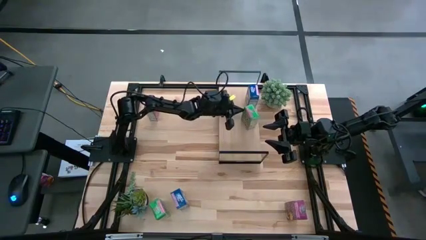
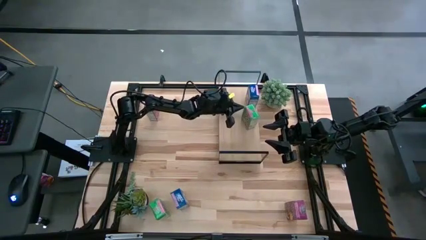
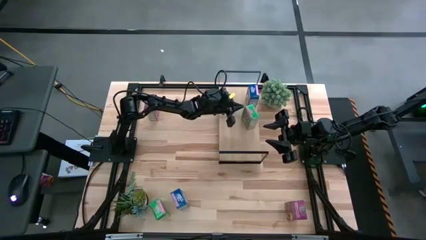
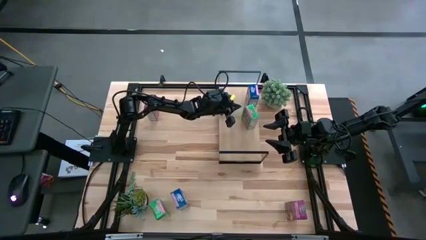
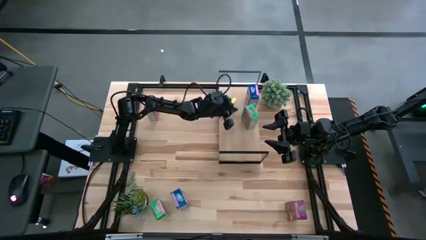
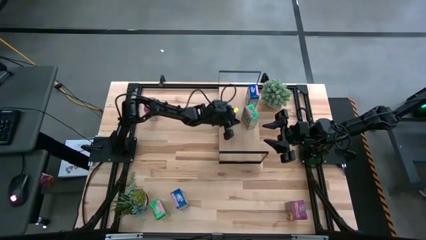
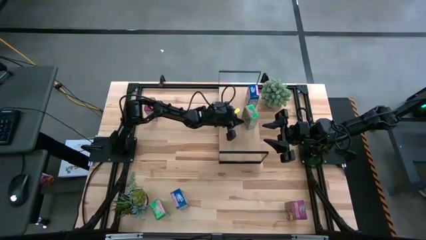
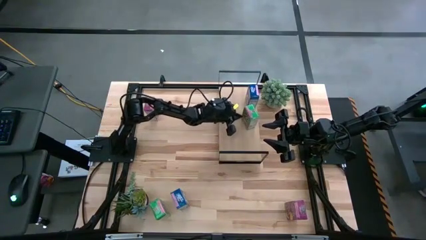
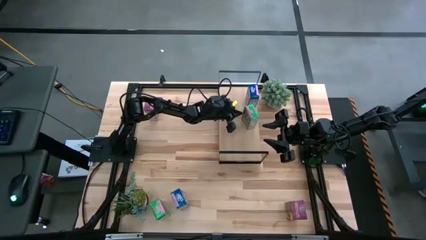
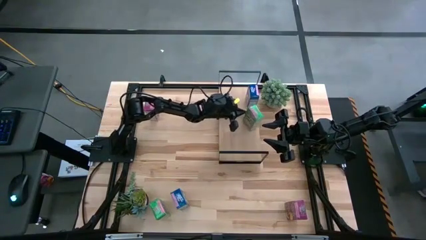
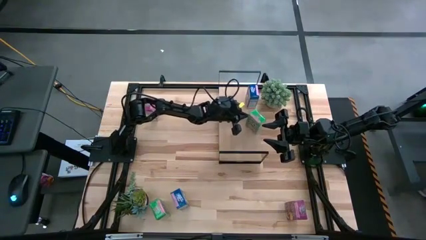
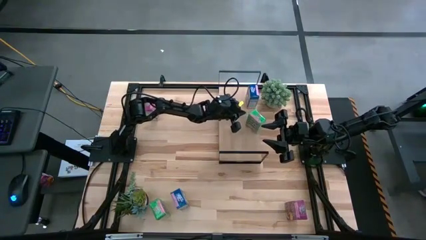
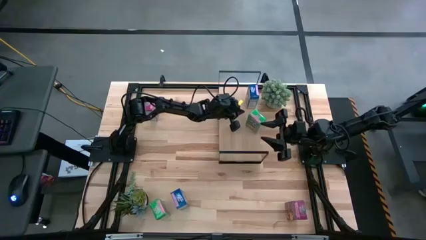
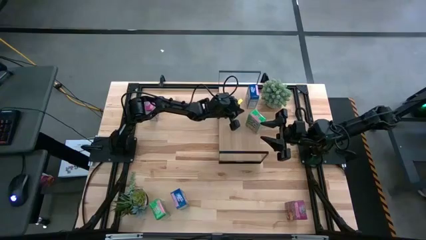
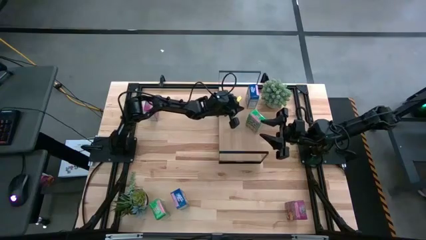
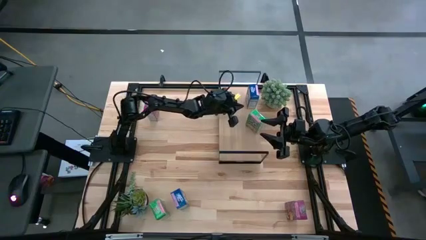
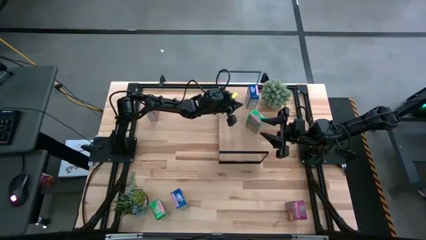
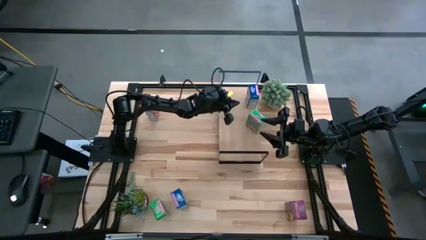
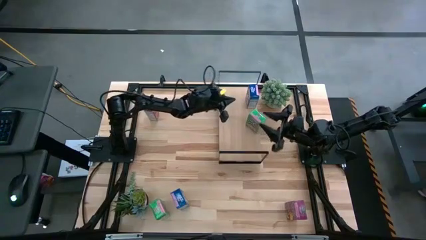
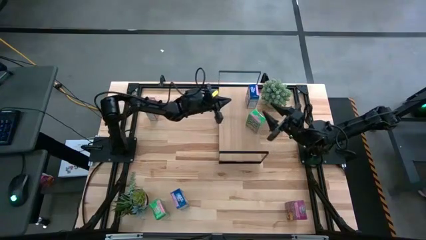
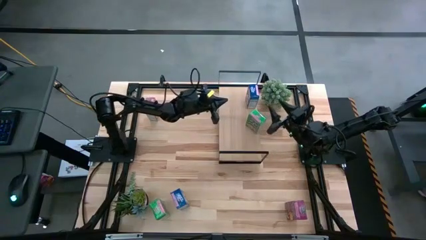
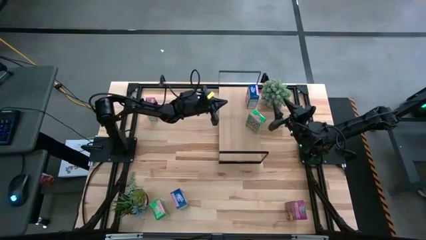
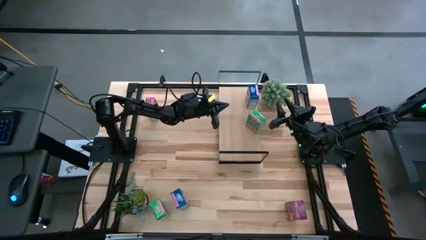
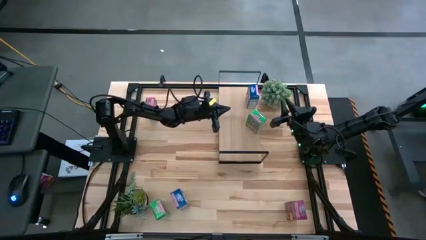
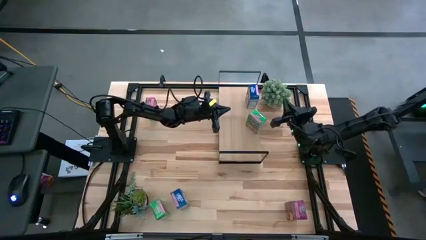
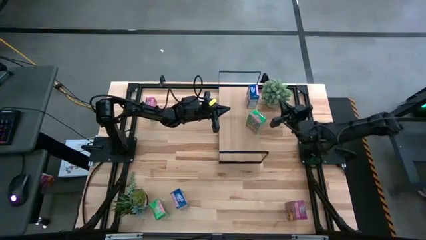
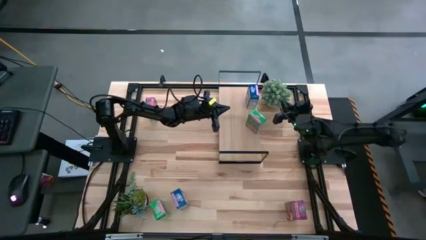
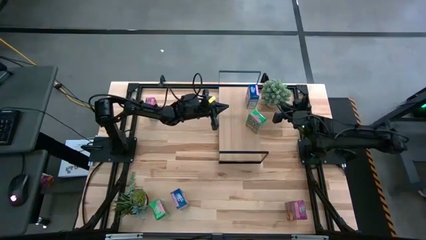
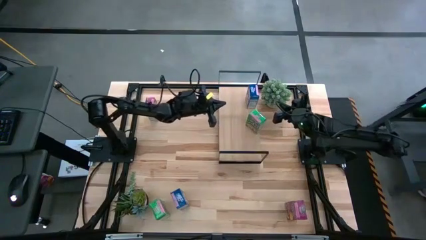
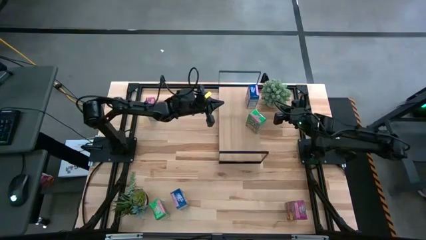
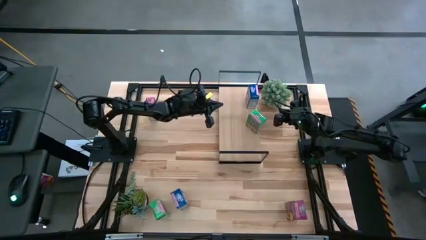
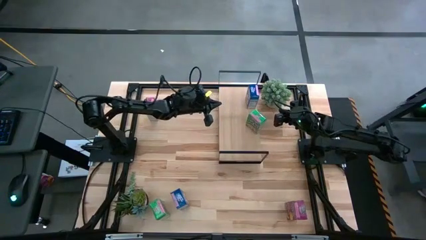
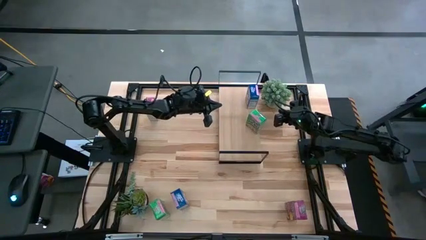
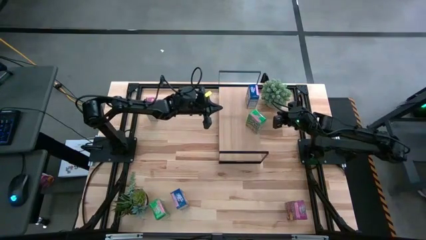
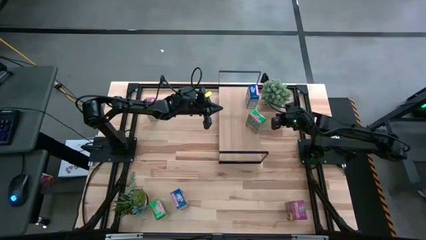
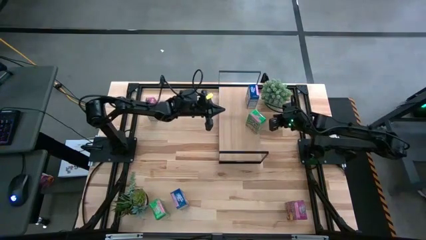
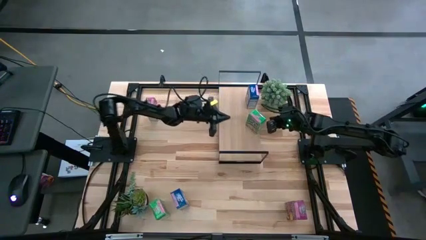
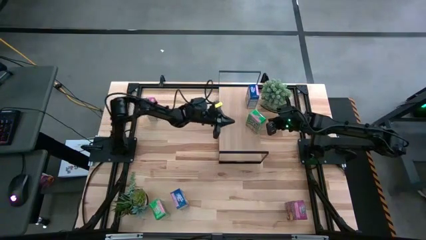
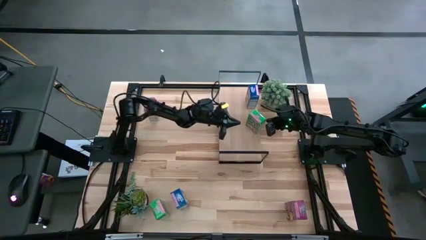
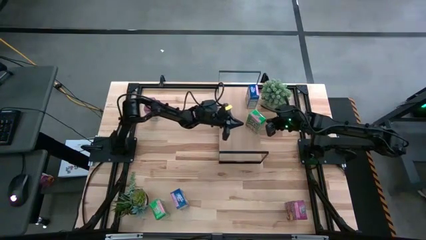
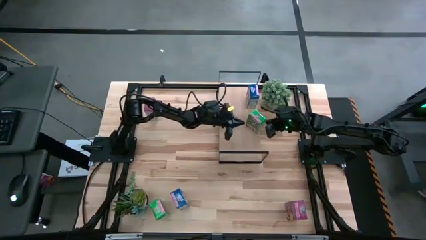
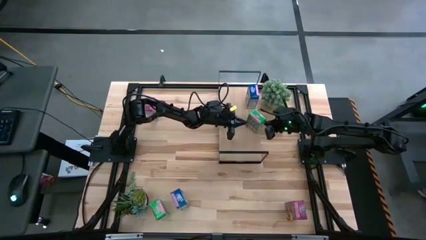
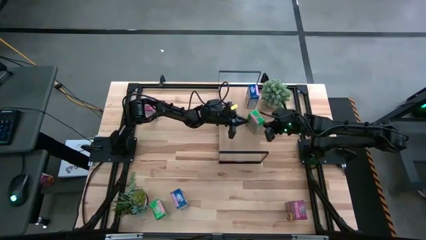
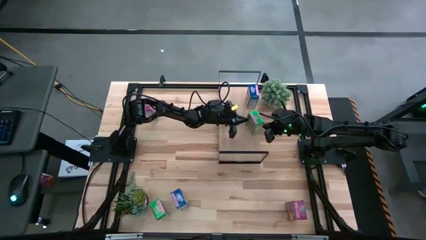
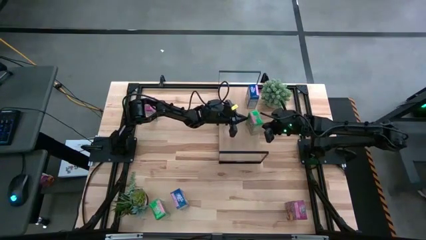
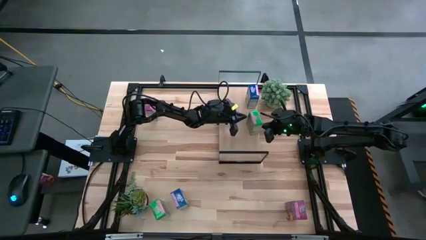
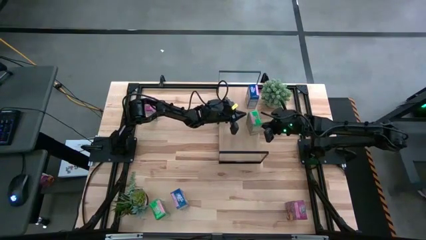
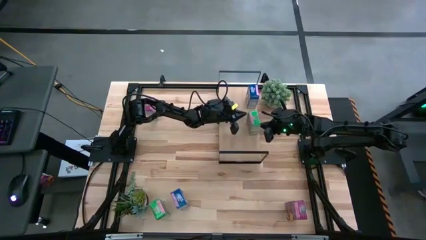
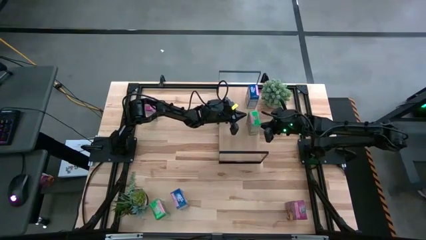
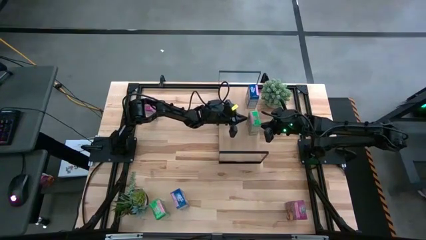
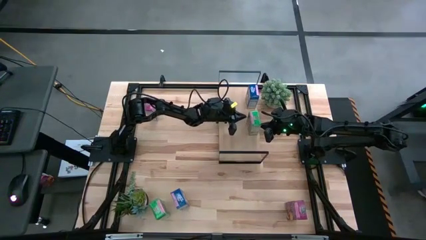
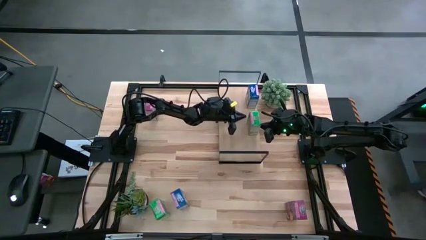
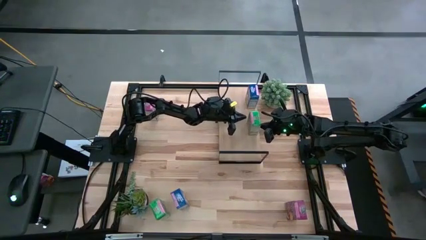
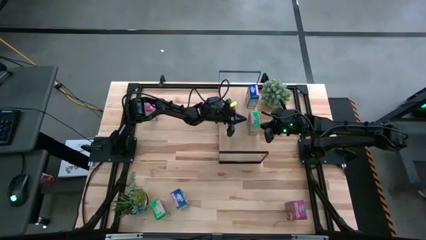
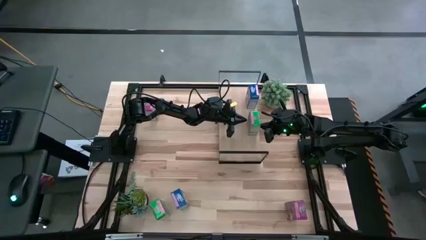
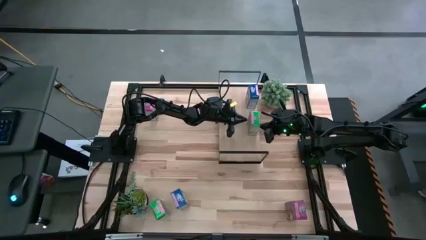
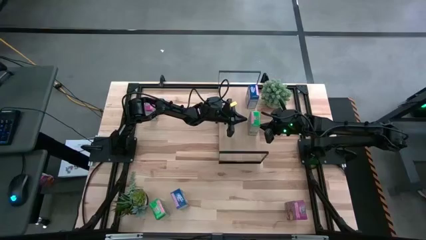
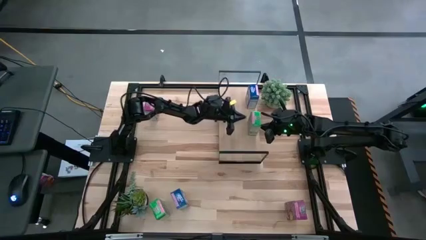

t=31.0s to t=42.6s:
Task: Stack cereal on shelf
Put the top green cereal box on the shelf

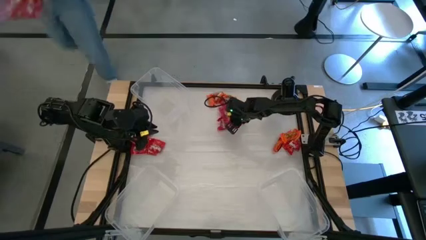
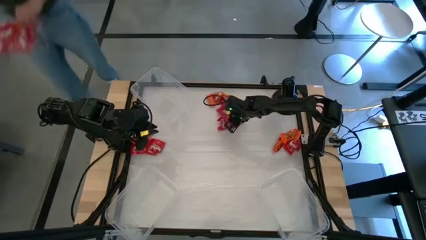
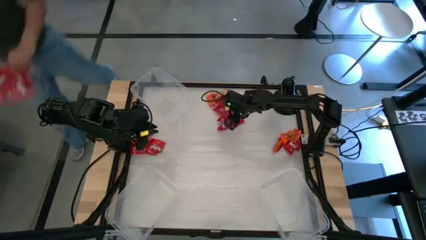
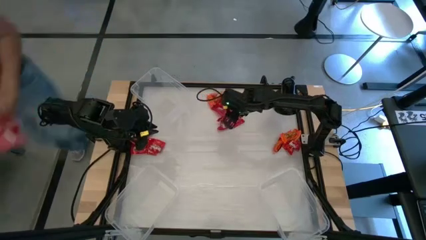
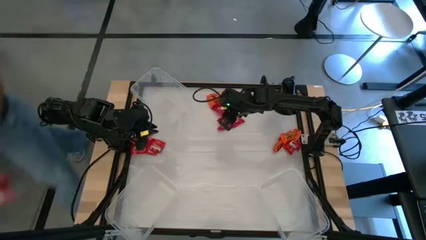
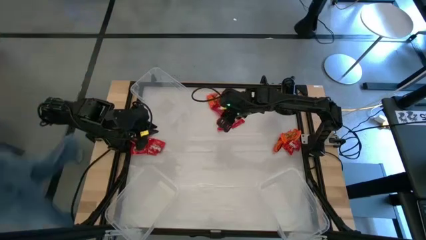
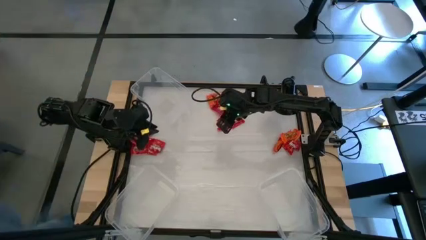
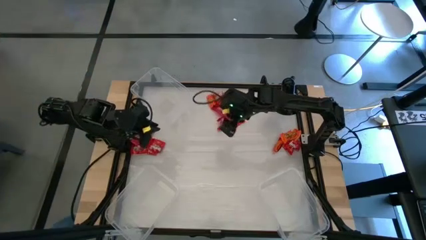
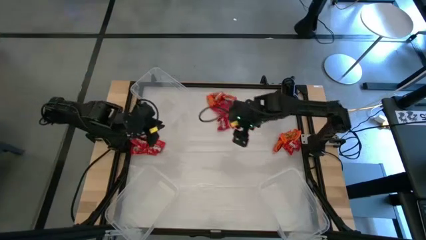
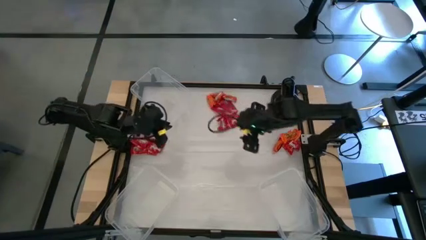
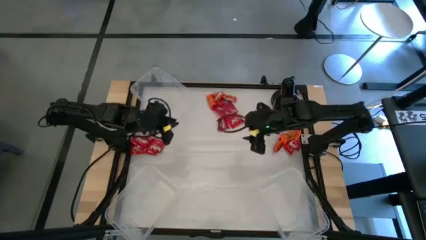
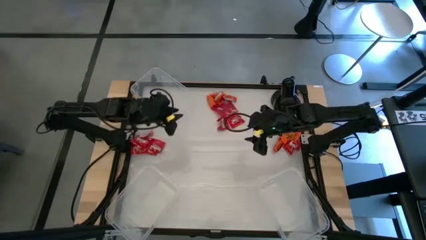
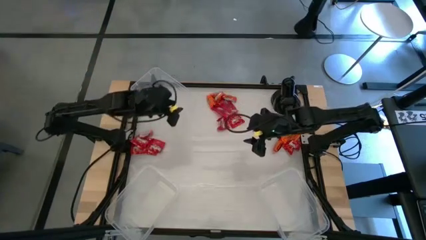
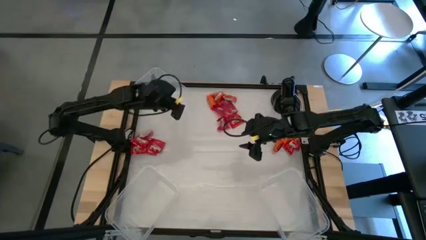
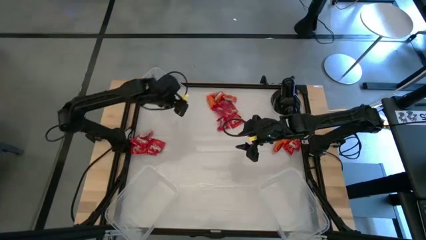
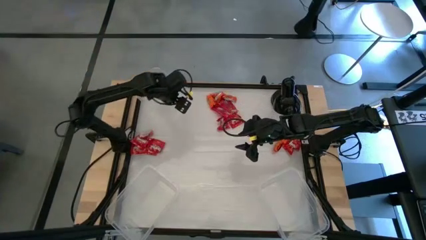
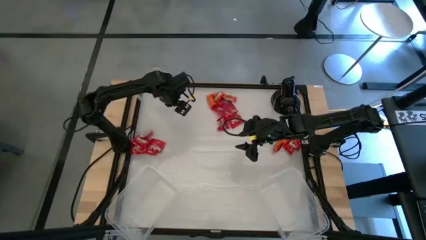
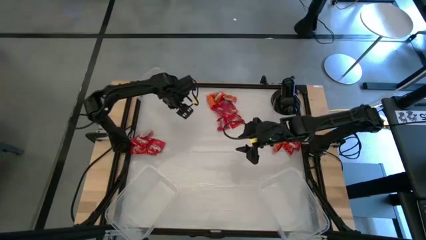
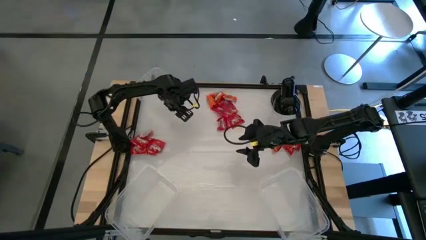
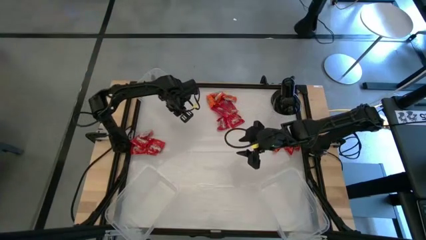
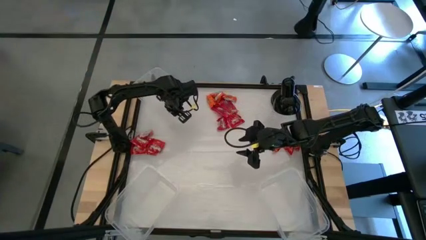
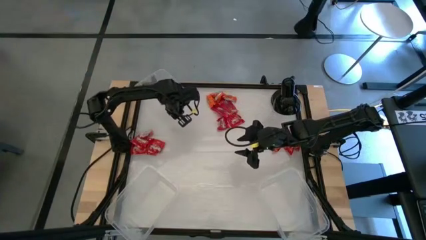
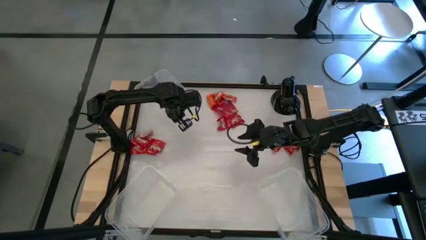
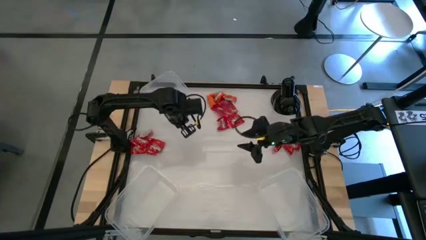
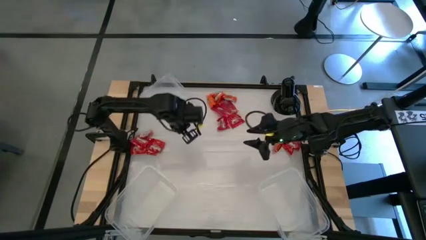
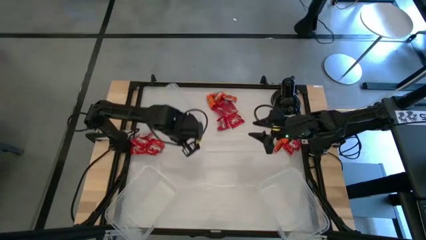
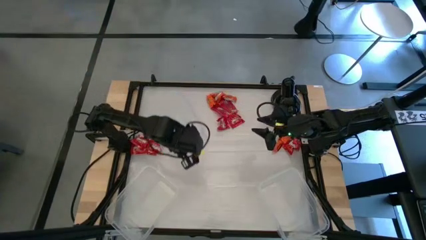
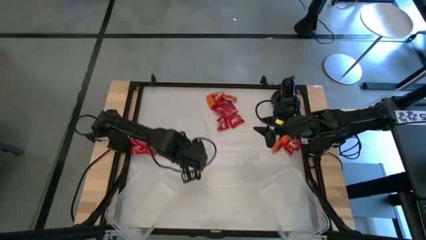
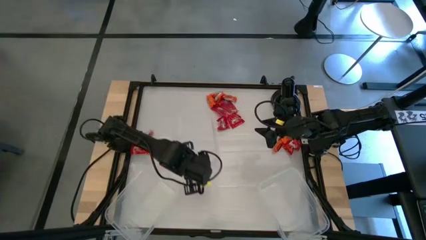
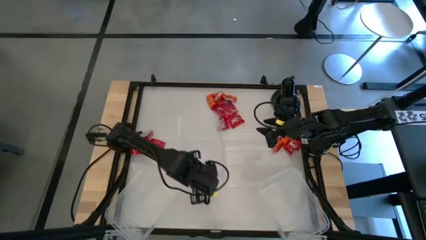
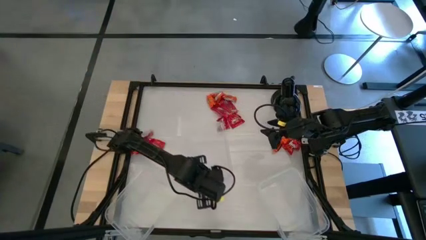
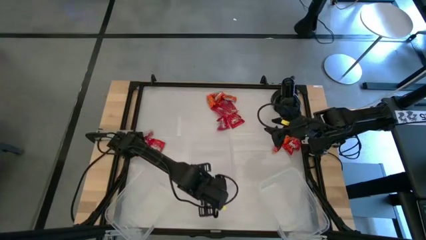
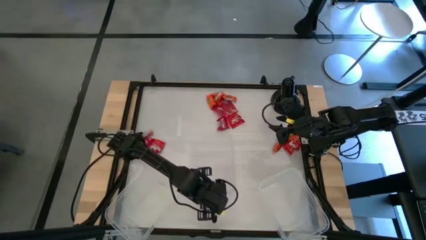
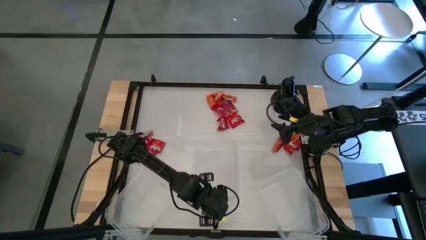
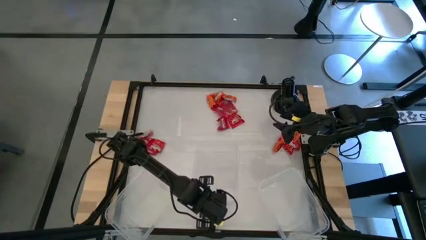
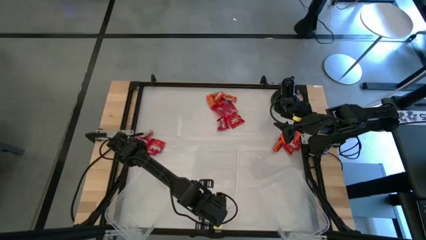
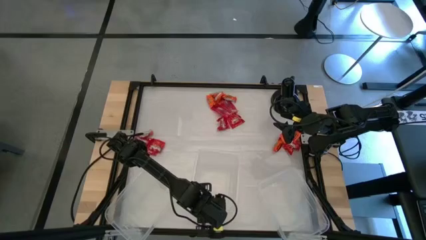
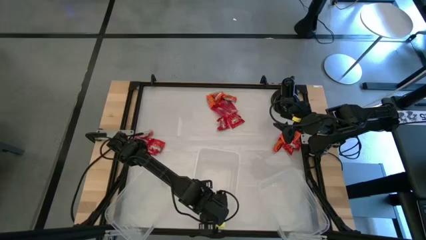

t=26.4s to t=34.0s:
Task: Sort candy
Move the top transparent bin to the bottom center of the table
